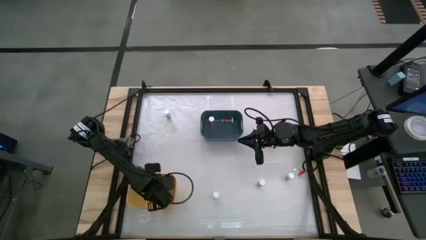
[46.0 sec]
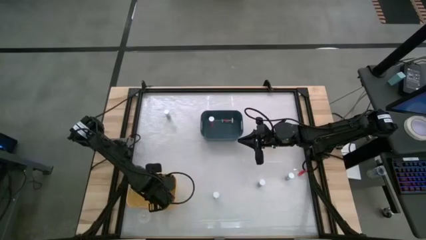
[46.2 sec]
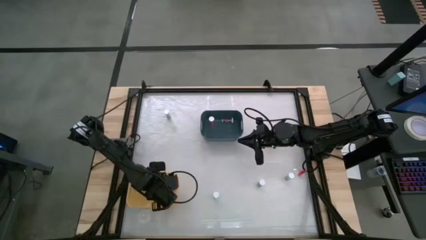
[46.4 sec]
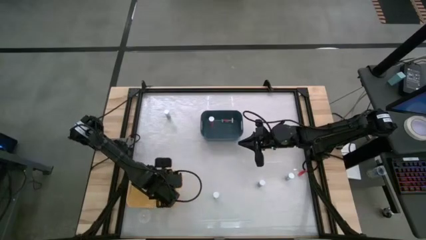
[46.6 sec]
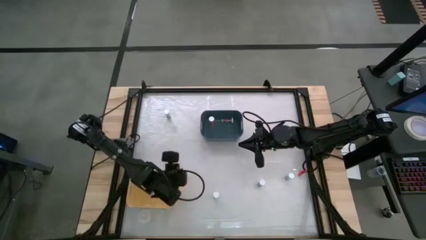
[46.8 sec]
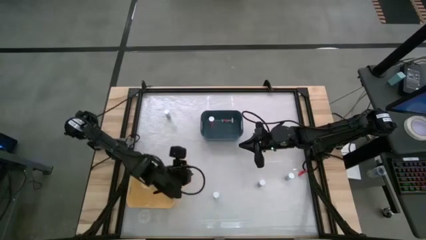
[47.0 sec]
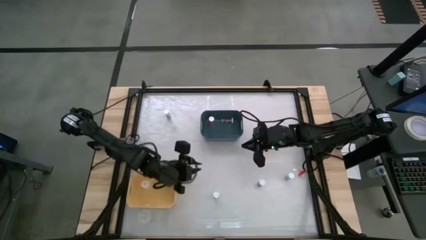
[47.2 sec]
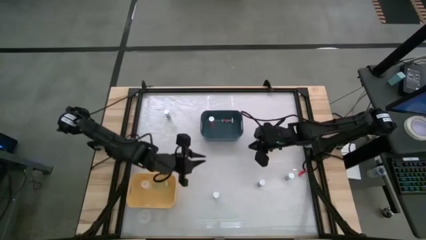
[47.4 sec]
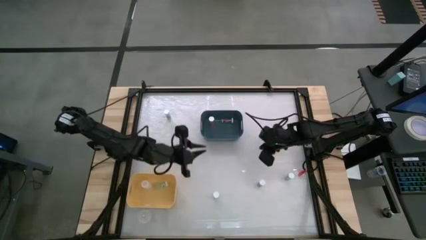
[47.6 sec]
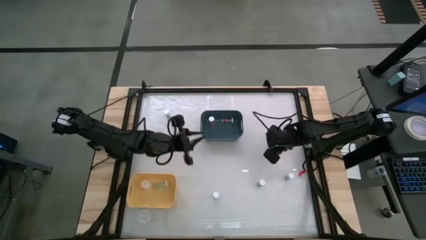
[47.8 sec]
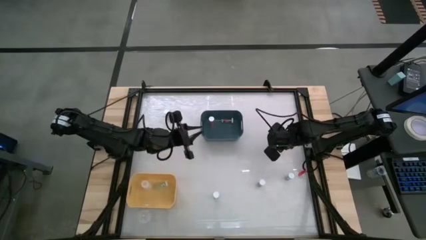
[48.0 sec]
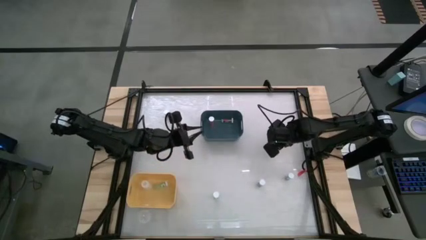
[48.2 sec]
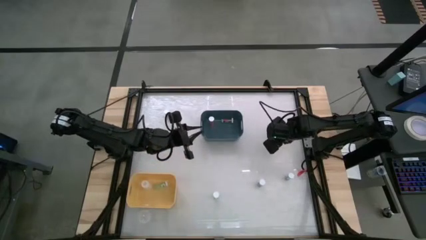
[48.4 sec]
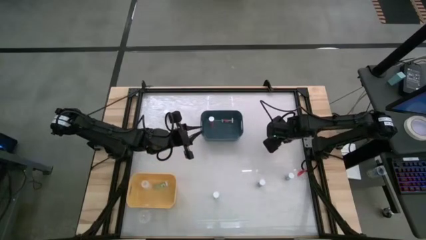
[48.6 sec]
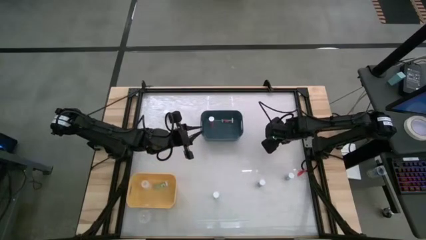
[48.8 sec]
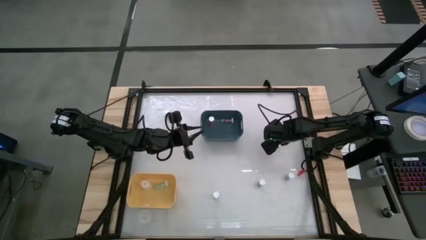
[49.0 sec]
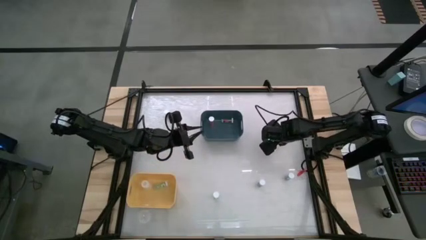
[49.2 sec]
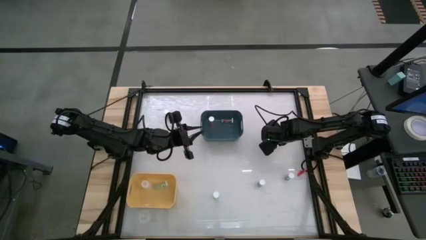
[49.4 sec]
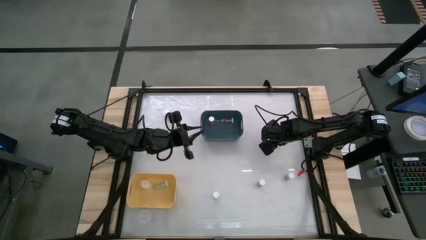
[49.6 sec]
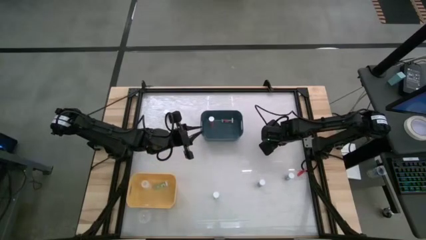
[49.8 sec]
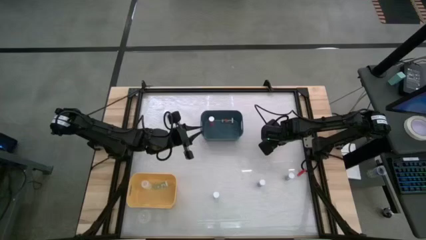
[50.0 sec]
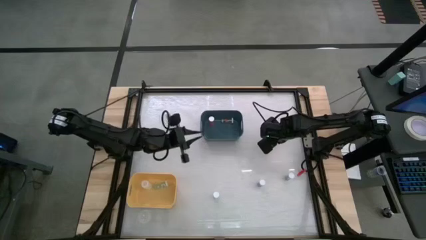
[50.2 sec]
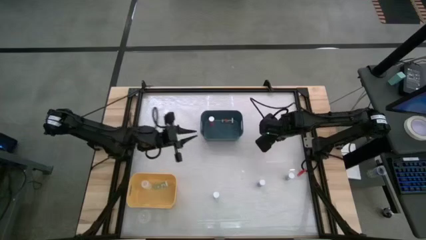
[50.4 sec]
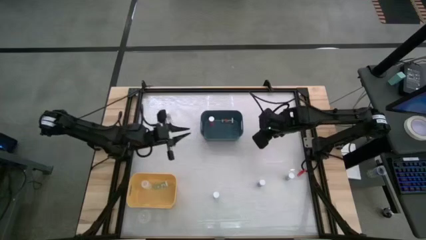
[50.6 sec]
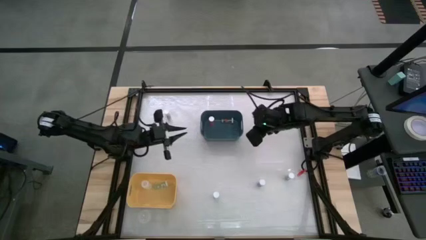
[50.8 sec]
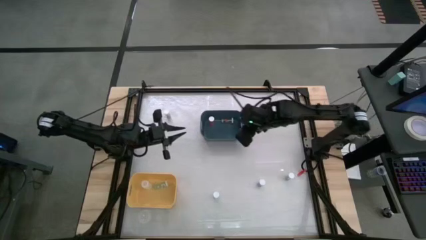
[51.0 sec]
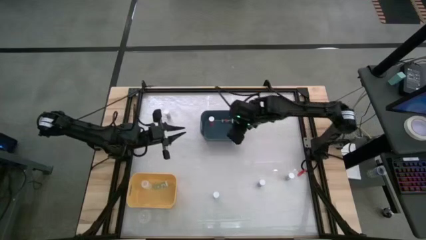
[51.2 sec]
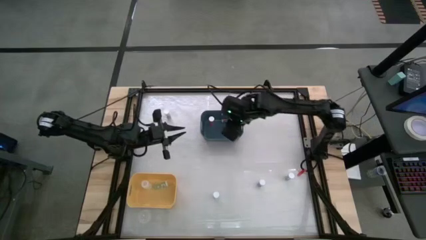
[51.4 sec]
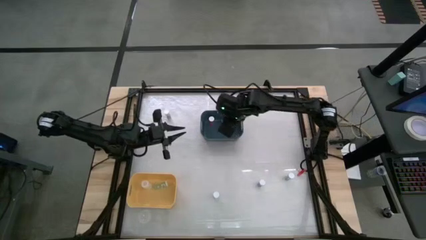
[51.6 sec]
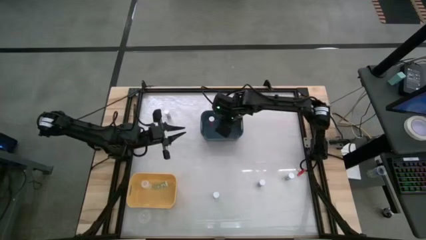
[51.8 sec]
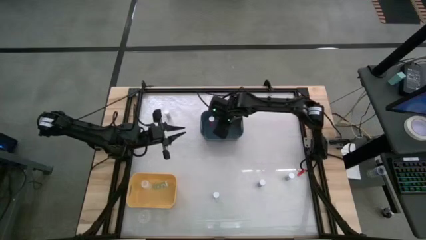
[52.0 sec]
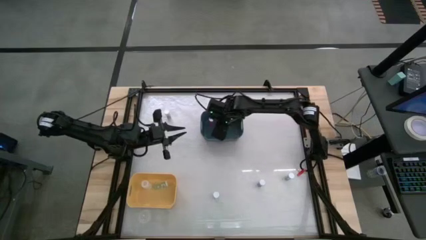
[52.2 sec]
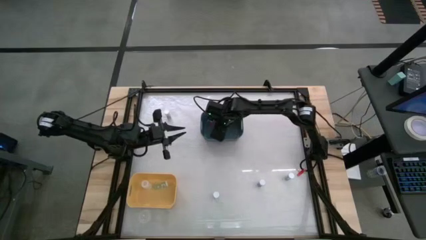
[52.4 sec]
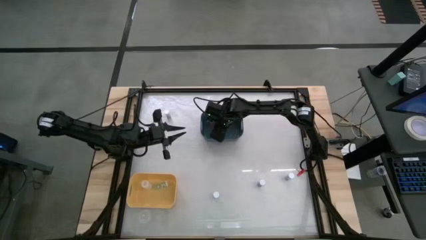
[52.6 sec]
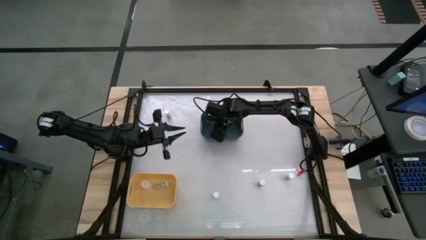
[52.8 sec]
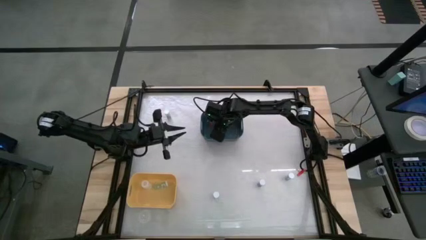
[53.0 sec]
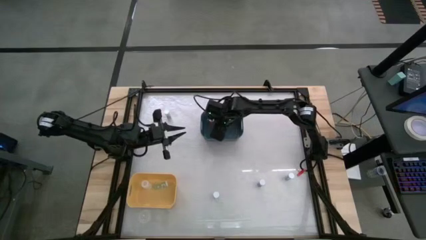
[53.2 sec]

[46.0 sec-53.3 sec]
Task: Pick and place medicine bottles into bin by pill shape (circle, oval)
Put the orange capsule bottle into the blue bin

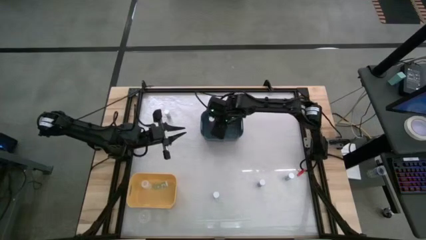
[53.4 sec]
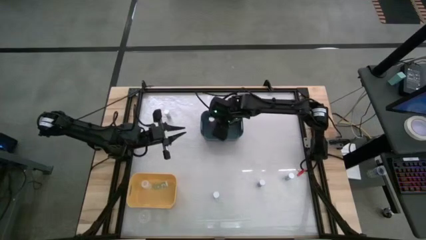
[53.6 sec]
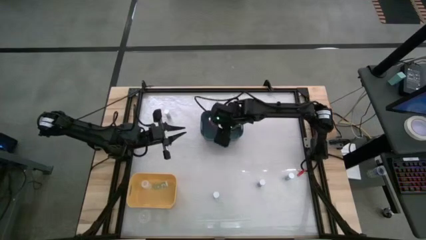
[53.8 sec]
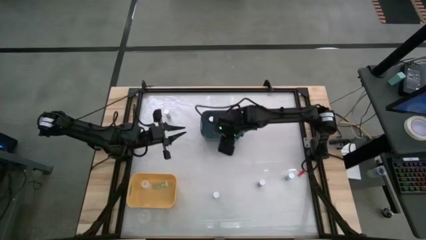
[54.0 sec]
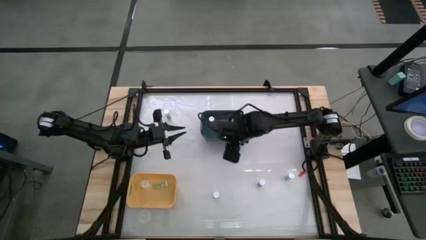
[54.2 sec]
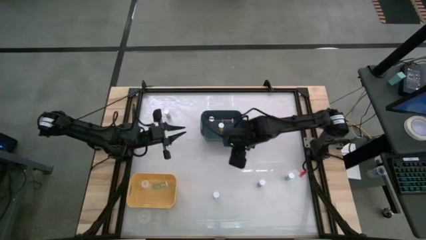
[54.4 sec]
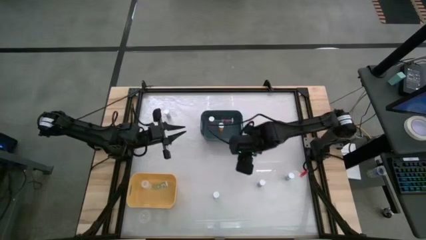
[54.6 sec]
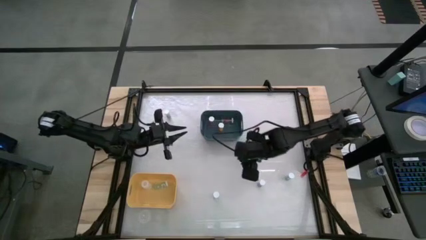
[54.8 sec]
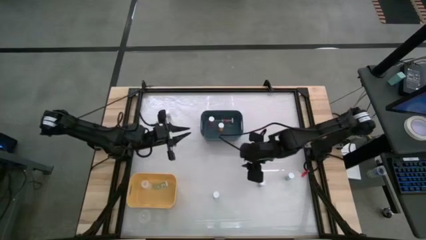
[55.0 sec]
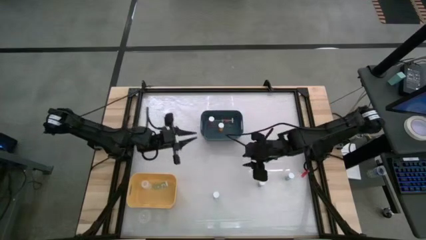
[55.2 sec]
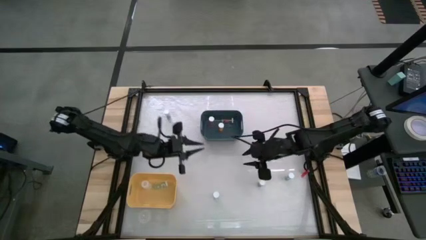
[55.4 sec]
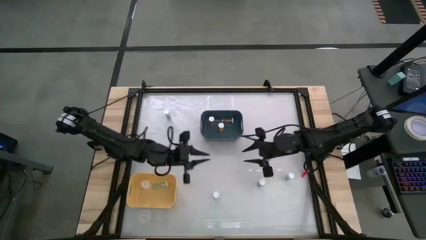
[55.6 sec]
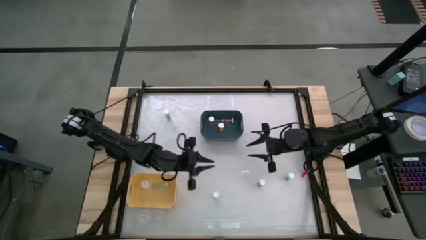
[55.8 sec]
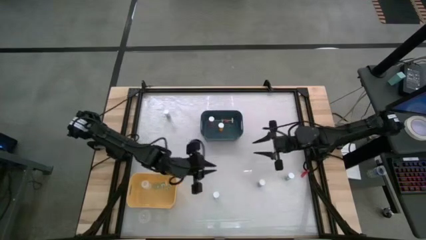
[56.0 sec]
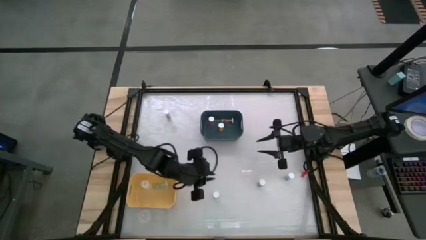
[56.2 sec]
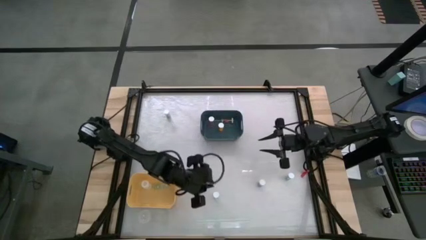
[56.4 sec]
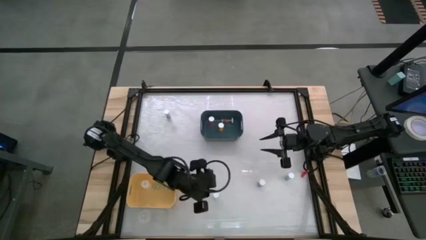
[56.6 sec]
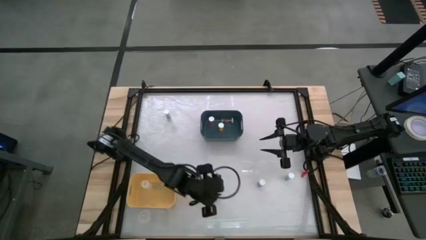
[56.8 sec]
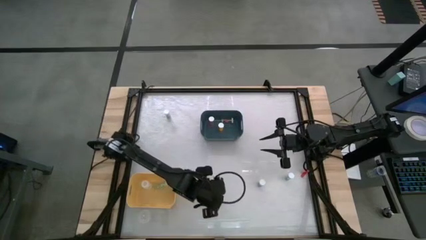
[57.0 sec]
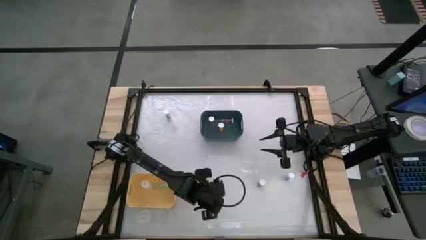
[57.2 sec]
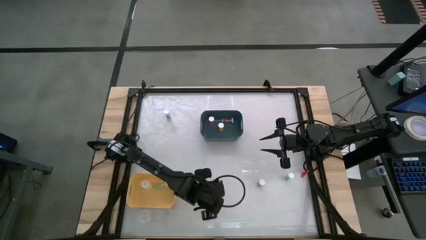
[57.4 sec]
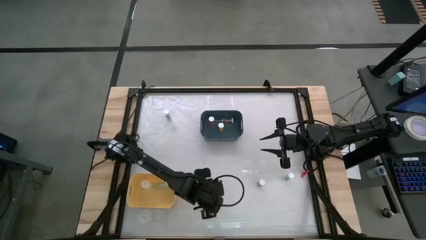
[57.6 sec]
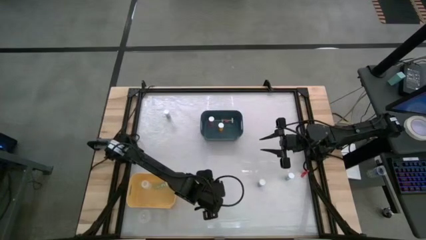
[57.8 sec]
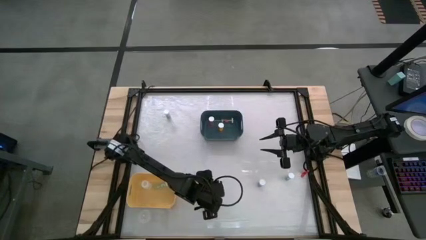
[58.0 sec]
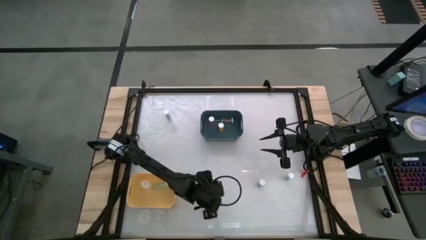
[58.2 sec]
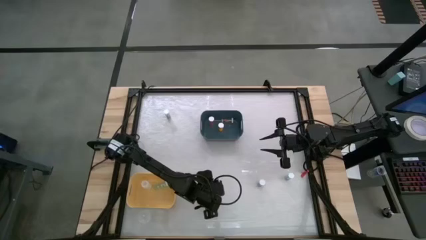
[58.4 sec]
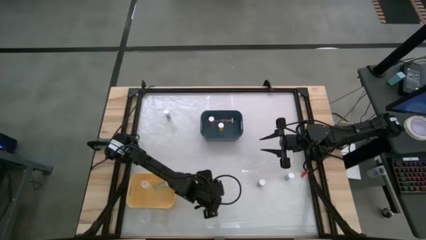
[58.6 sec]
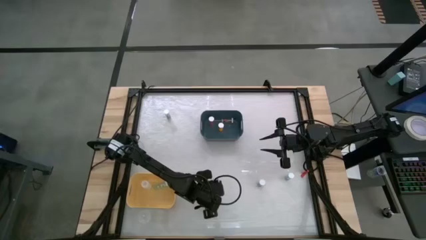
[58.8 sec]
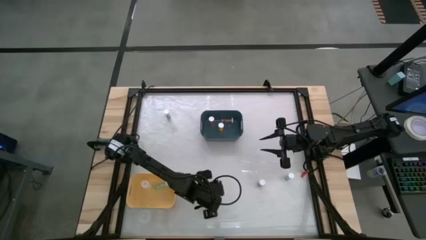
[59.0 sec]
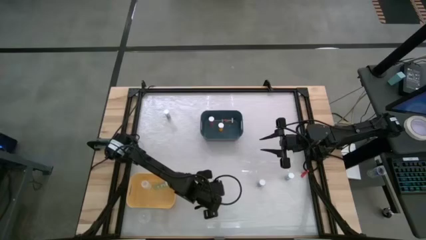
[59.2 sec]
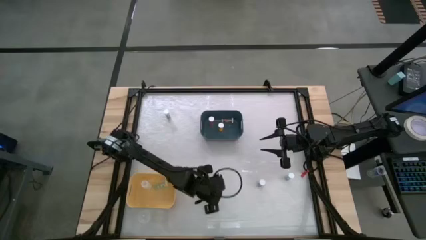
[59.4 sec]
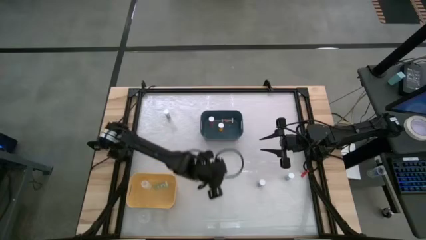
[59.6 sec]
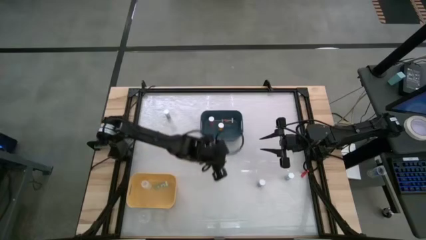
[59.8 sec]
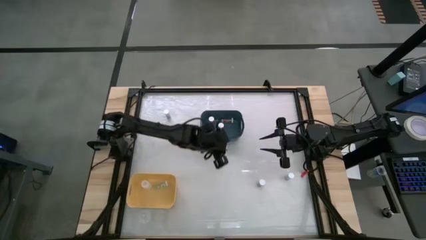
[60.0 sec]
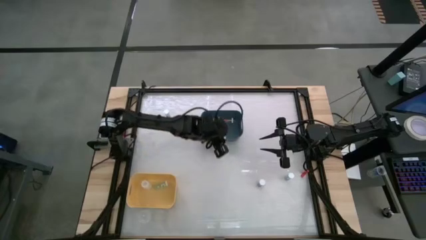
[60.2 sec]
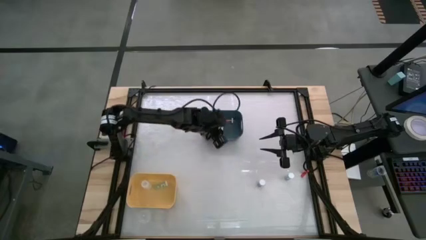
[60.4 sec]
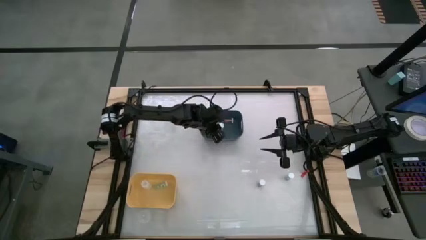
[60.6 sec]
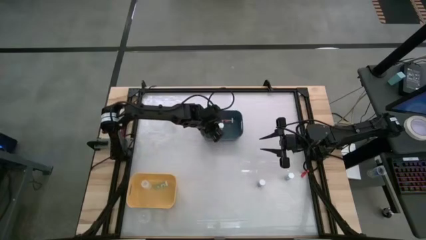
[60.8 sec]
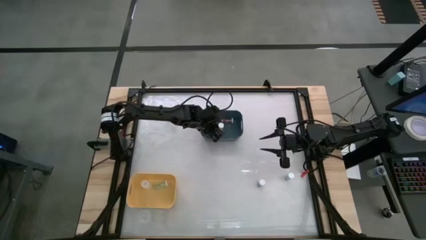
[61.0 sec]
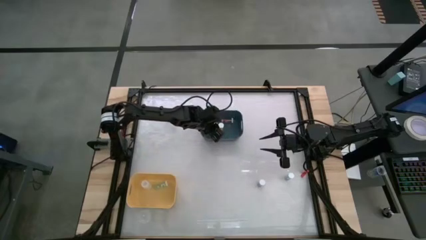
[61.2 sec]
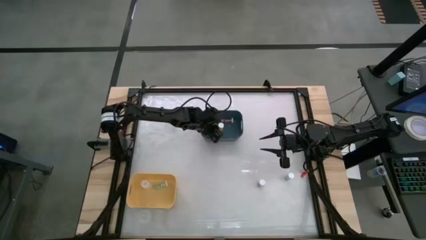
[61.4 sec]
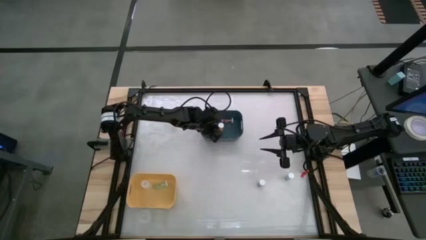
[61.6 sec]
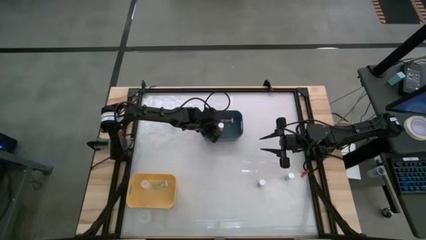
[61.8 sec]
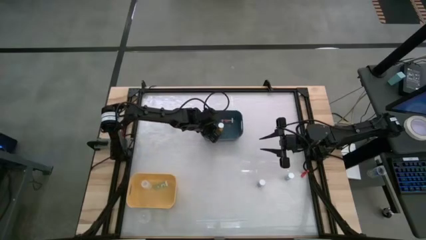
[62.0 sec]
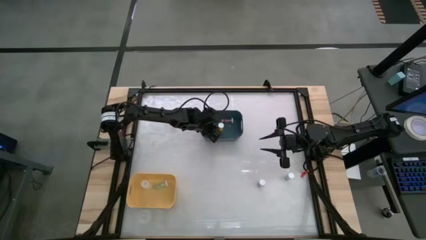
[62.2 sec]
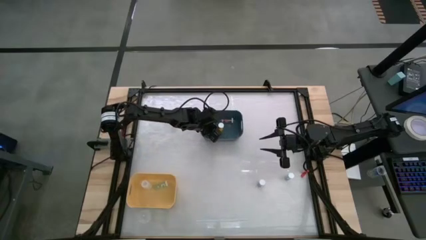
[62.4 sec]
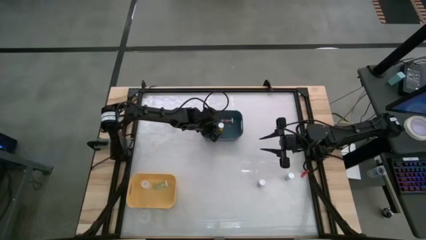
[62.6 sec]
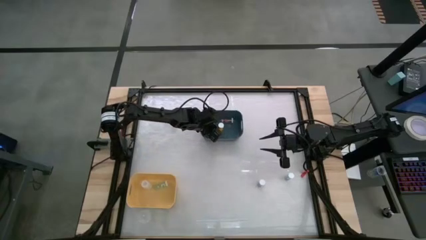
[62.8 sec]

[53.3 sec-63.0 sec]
Put the green capsule bottle into the blue bin
